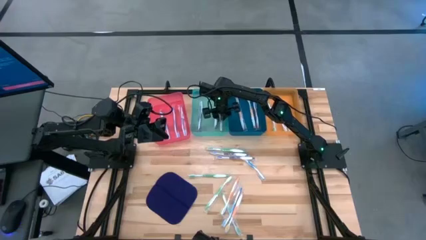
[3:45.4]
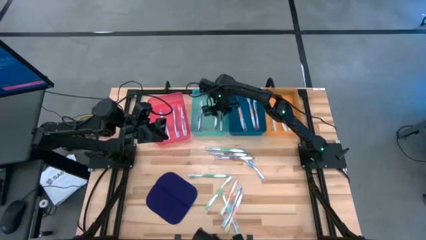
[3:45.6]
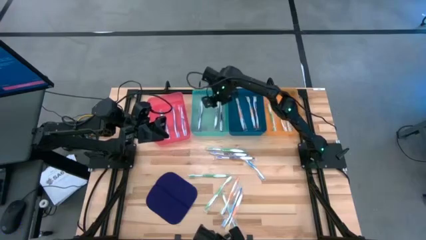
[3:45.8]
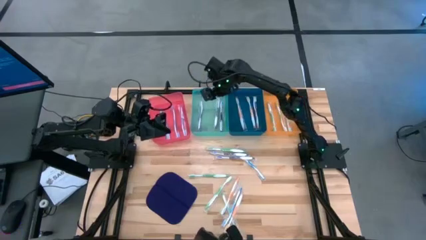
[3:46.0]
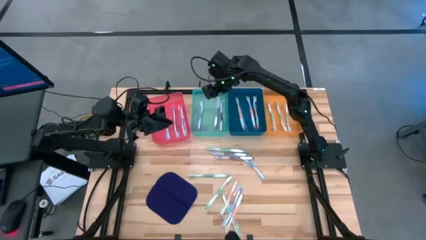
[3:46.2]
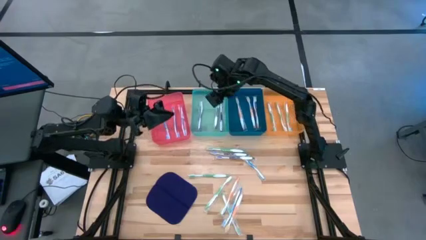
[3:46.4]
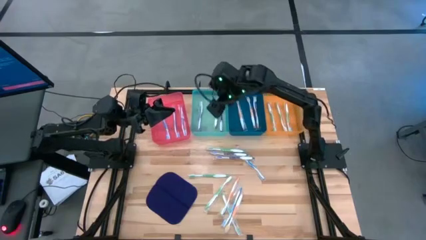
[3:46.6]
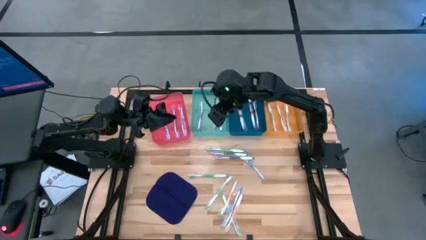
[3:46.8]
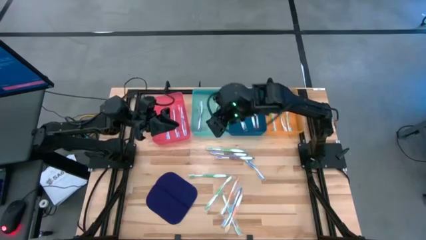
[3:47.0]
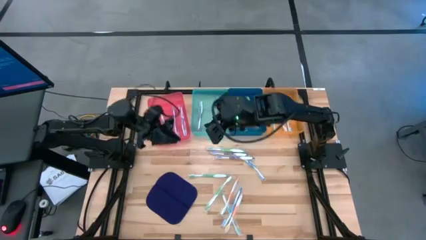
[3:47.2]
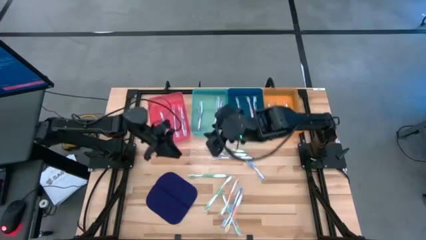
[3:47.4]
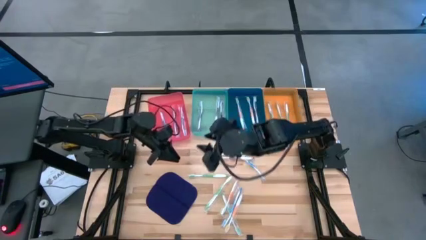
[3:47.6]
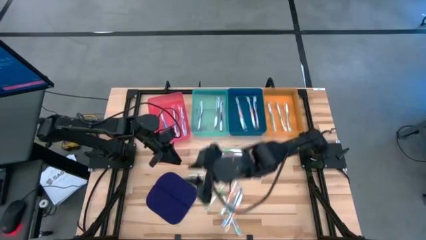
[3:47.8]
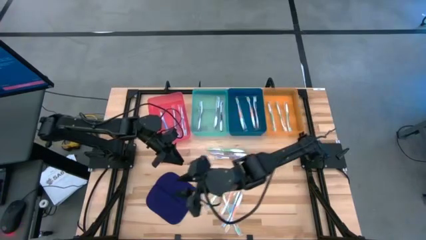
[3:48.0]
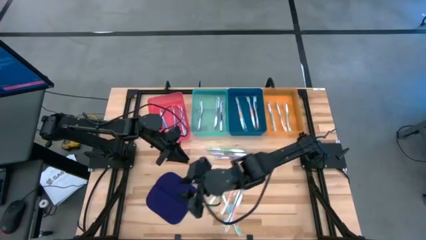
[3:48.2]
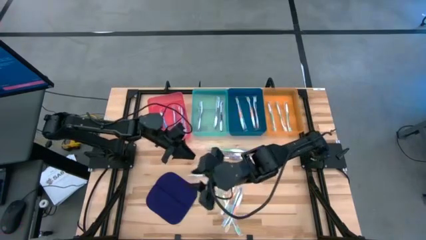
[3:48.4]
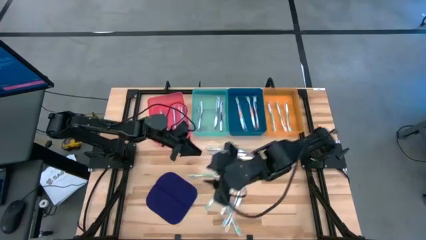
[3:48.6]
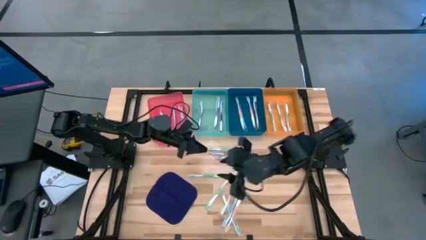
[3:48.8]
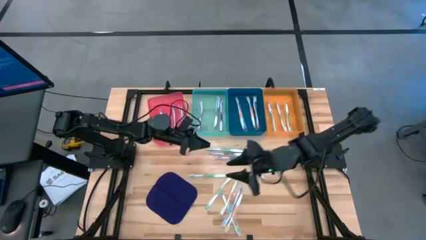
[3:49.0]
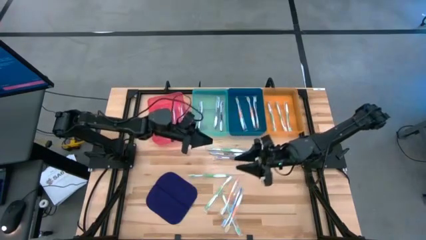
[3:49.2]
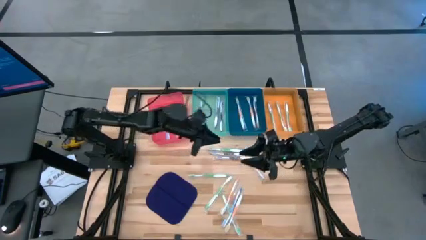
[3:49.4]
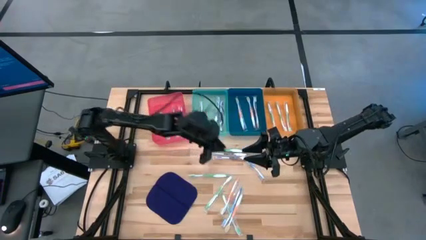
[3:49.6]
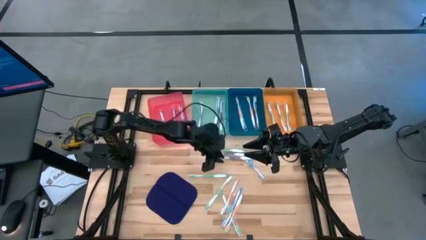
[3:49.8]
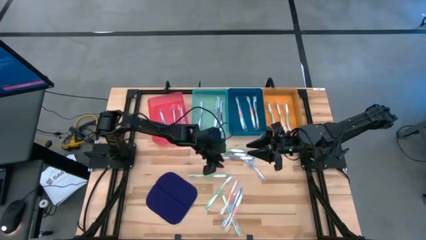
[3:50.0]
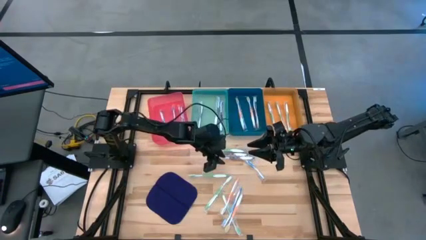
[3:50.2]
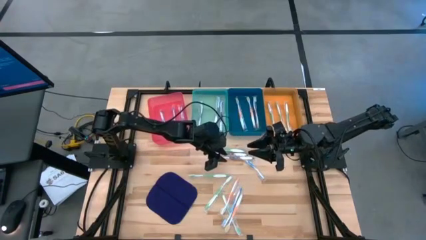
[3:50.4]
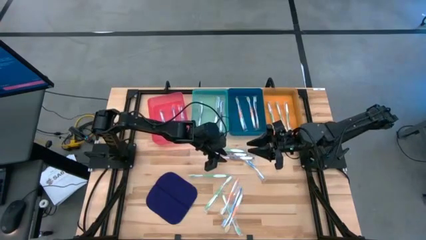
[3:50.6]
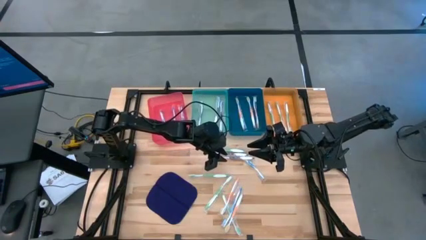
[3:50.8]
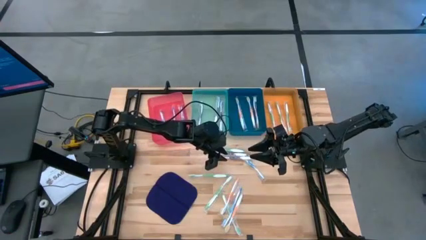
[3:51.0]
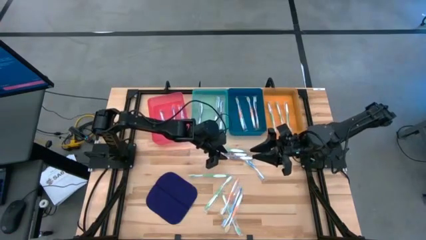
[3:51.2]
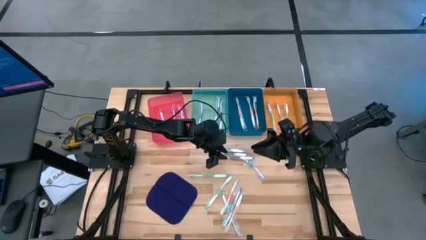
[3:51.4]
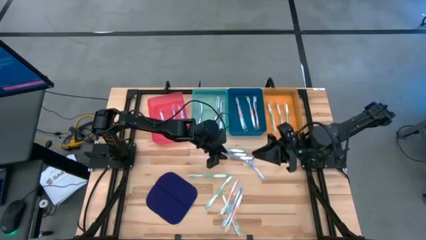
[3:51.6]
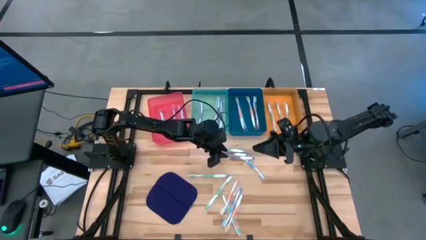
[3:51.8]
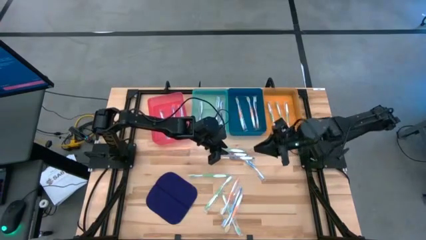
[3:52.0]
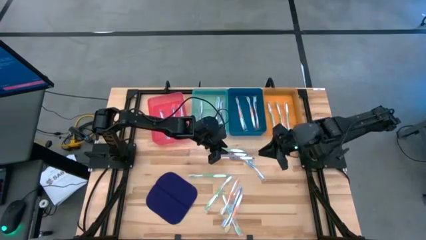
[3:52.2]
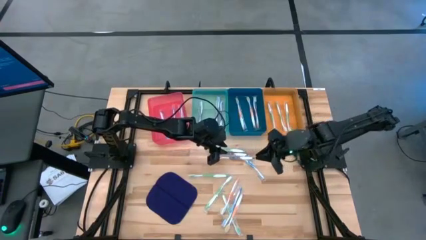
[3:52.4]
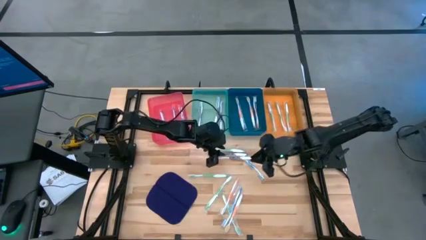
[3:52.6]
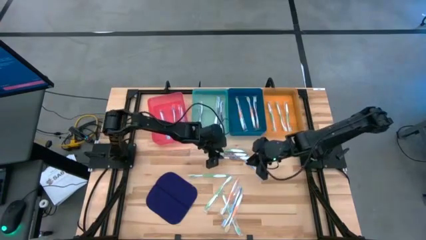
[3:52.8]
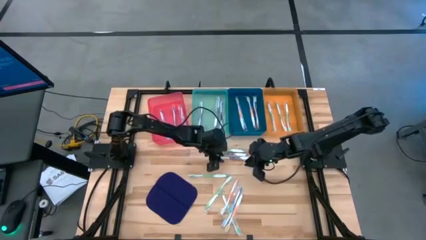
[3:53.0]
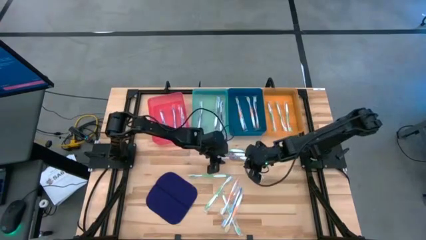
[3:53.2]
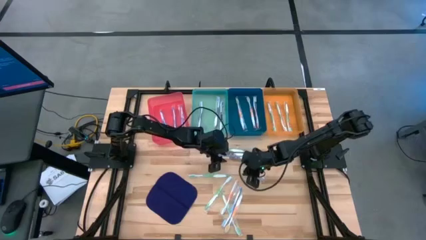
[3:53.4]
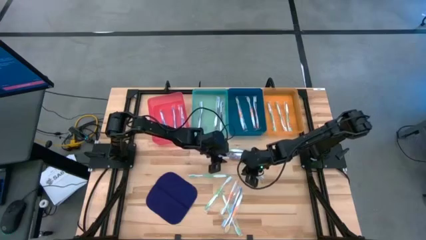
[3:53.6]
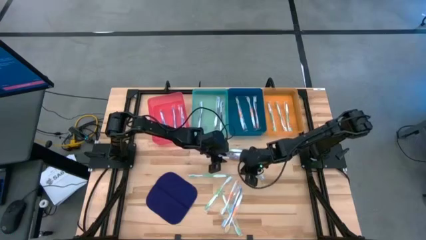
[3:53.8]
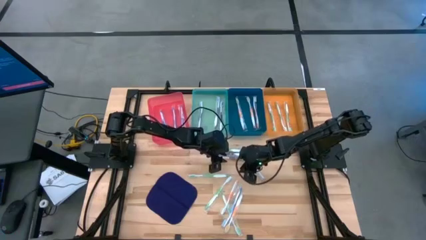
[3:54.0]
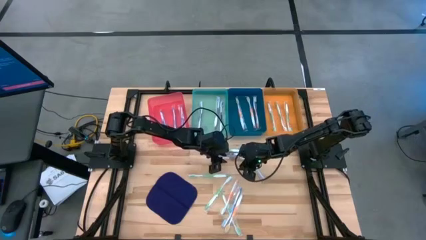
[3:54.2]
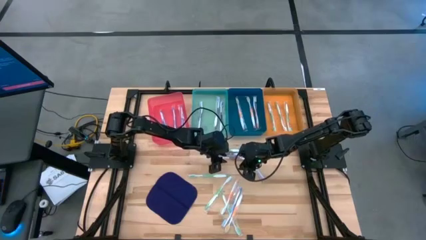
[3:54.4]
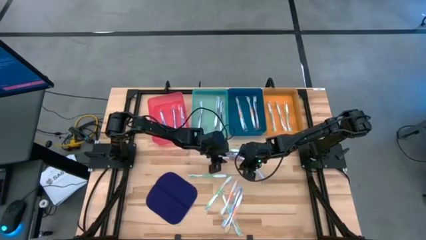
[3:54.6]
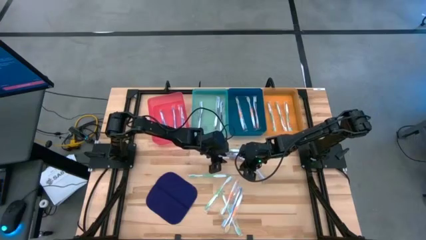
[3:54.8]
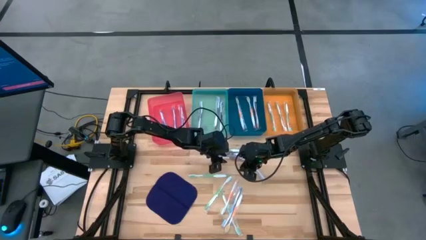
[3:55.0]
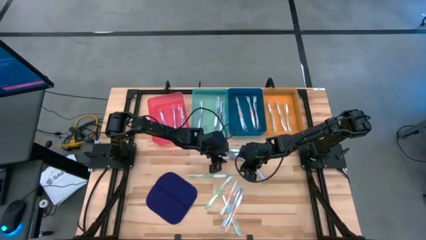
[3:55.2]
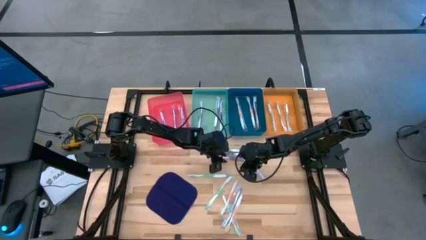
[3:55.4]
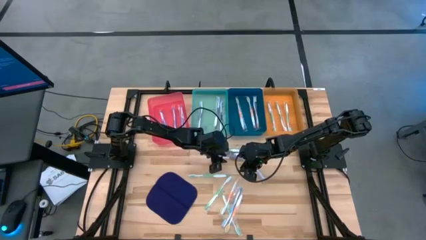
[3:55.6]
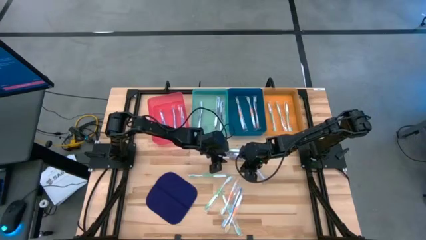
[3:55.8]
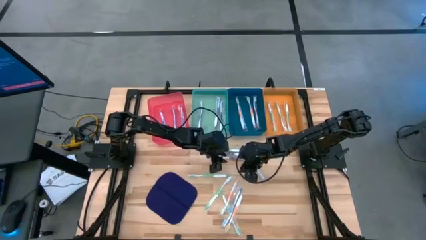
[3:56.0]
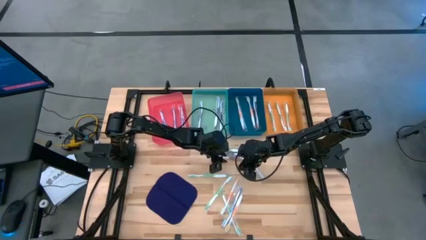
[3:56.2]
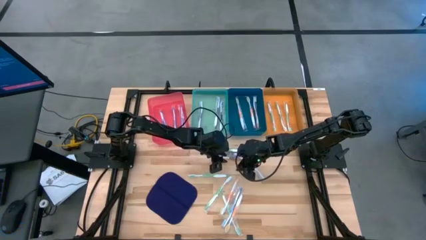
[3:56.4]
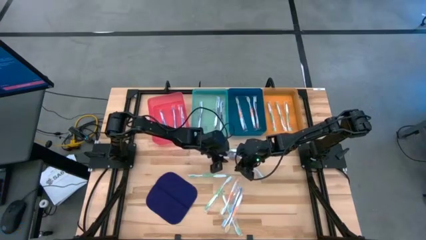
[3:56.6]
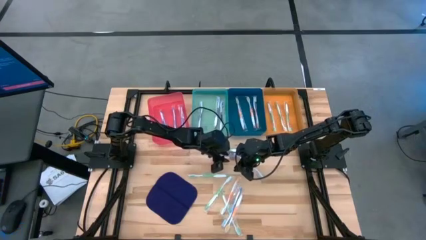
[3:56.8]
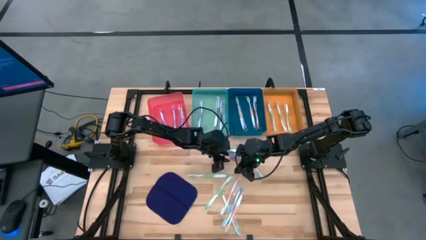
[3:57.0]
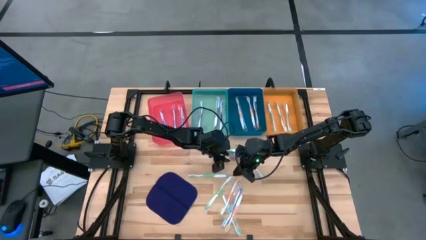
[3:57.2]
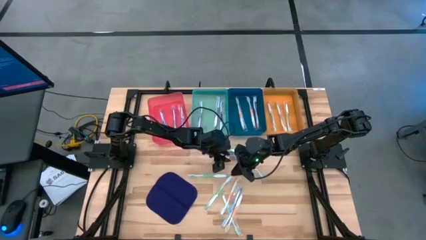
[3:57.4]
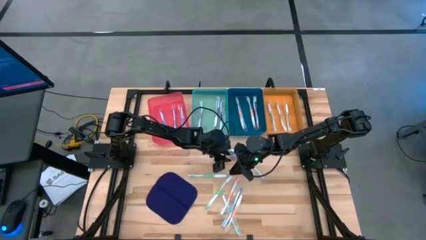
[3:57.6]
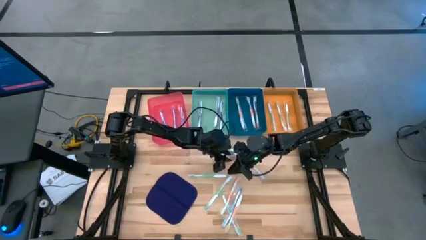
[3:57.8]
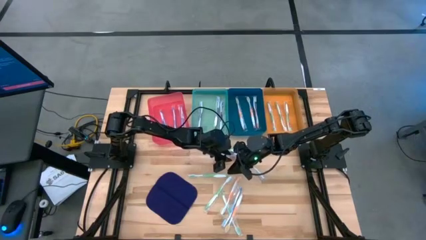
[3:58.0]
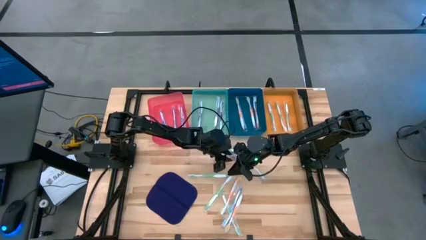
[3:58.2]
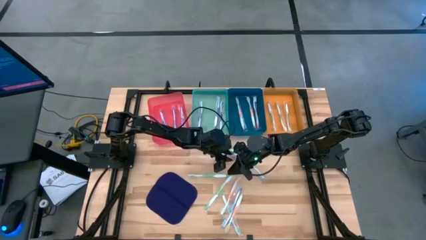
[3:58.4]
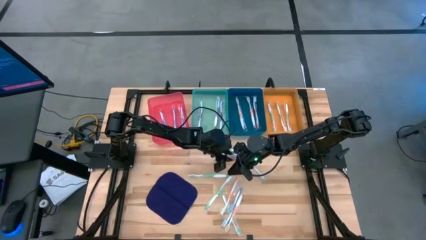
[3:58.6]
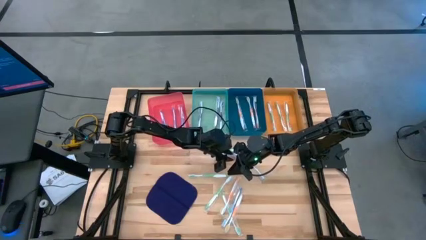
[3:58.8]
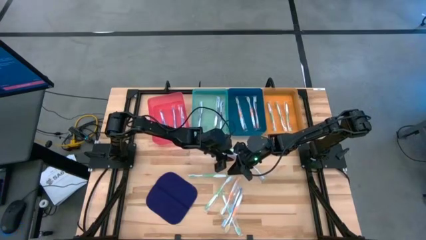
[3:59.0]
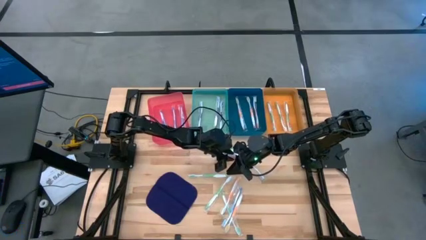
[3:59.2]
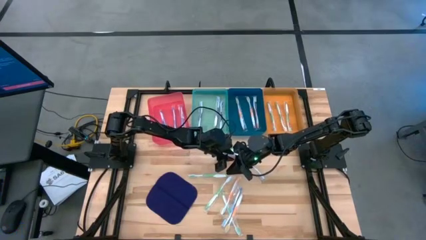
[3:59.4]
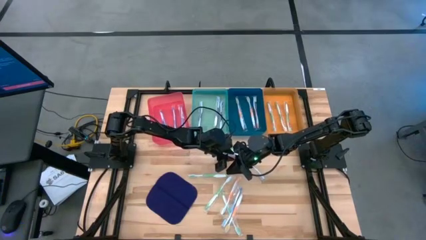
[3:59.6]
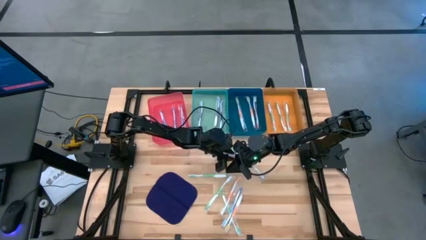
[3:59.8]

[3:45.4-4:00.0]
Task: Pick & Place Toothbrushes
Put the purple toothbrush into the green bin

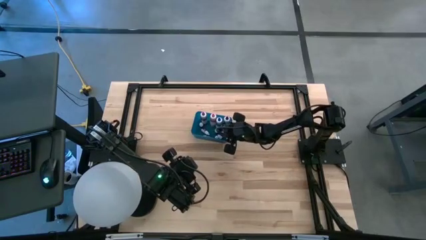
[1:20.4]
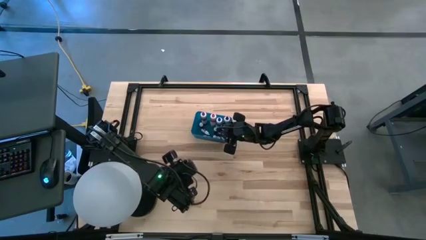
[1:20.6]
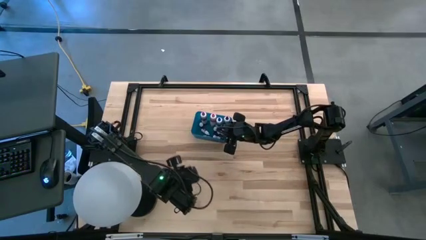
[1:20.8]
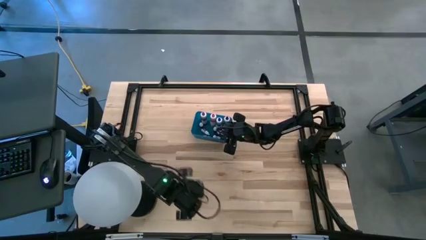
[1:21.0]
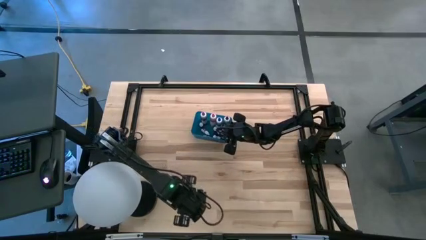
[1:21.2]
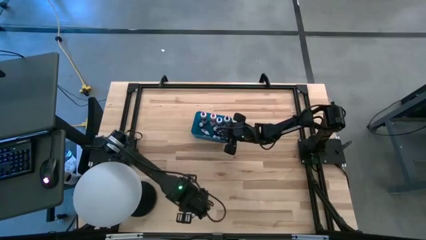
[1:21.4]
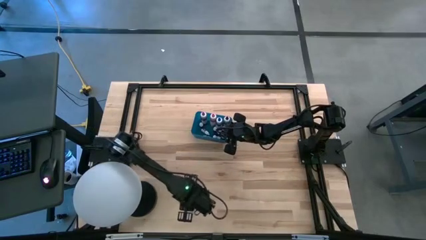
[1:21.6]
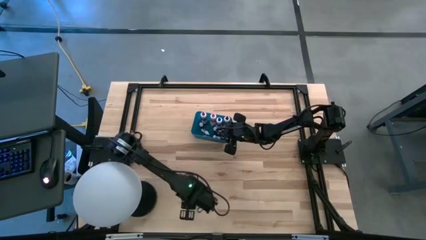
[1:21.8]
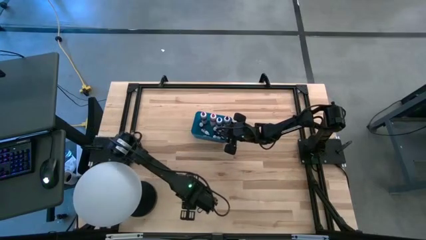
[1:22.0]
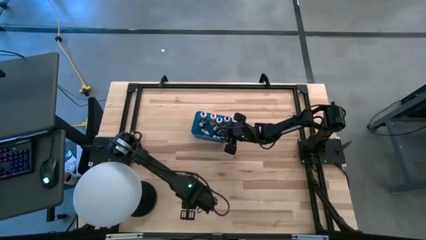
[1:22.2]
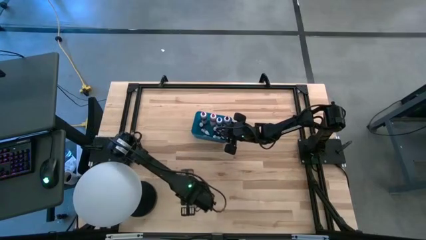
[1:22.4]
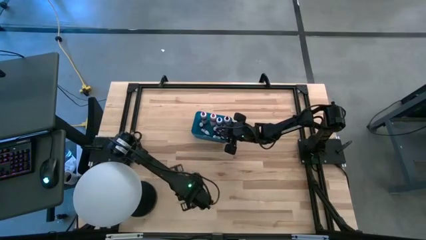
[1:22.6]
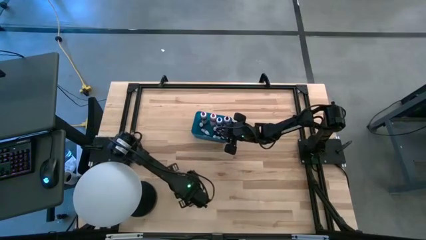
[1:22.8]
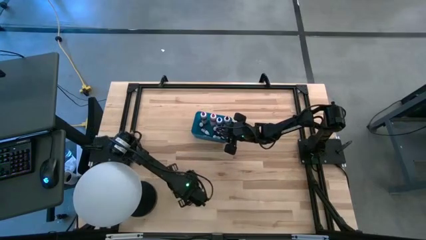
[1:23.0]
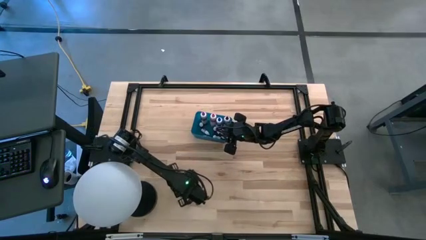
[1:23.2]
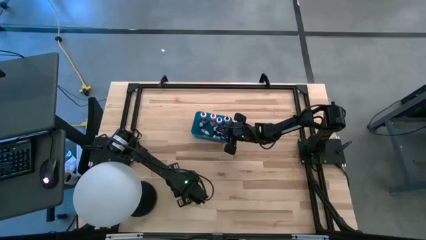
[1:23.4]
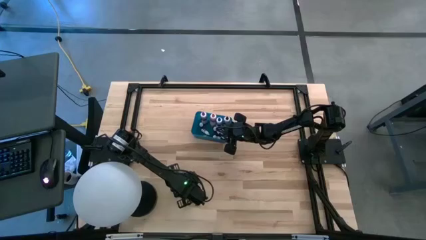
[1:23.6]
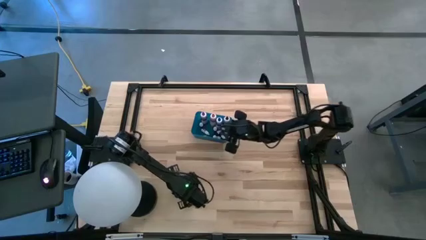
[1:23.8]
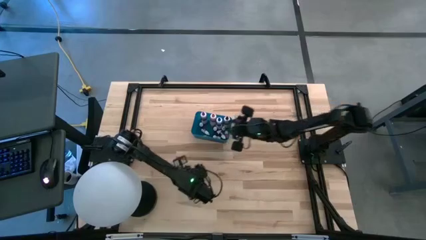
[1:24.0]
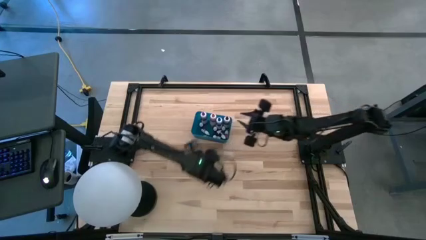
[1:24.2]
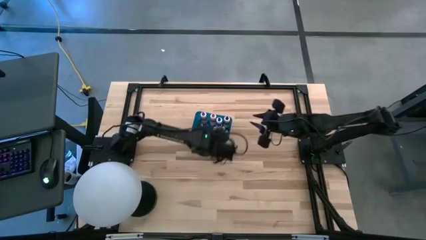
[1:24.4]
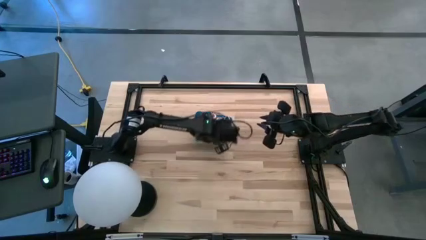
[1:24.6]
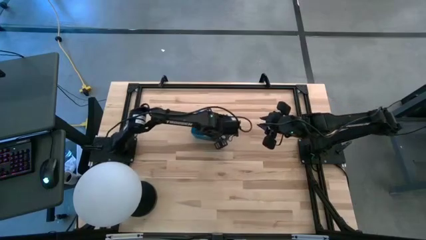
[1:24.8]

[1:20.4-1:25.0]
Task: Pick & Place food coloring
Put the green food coloring bottle into the blue bin
